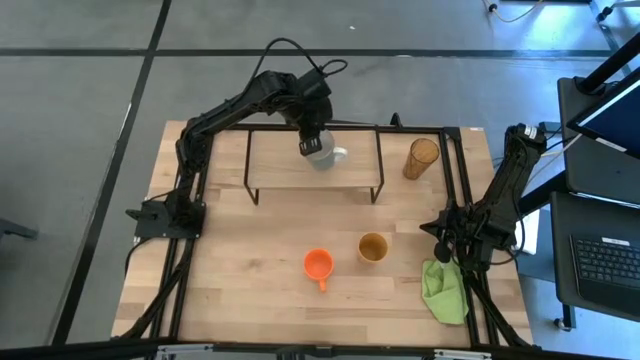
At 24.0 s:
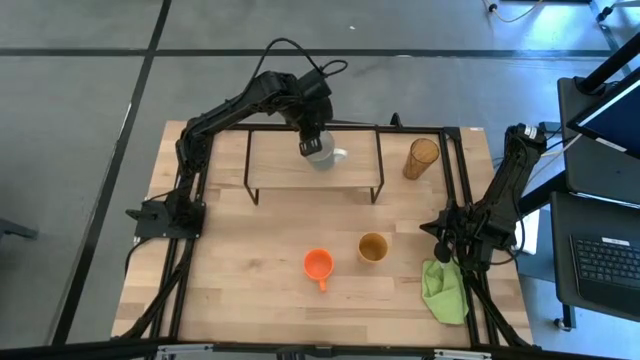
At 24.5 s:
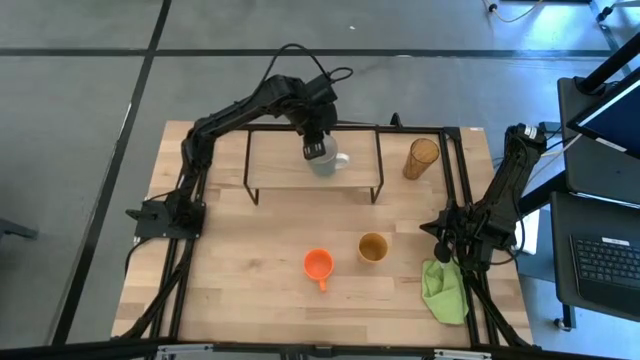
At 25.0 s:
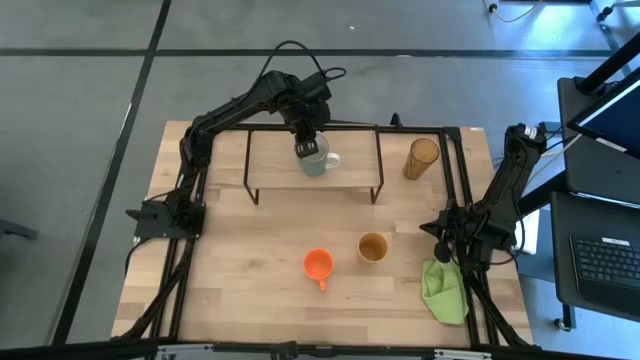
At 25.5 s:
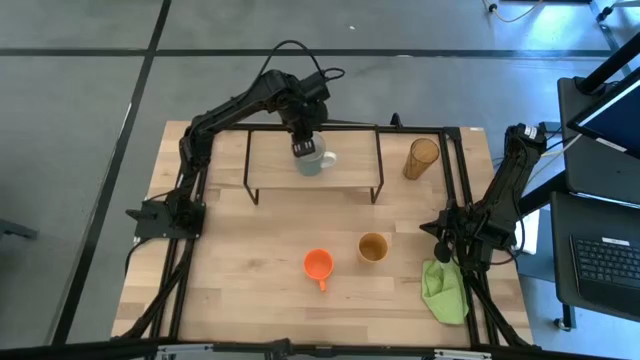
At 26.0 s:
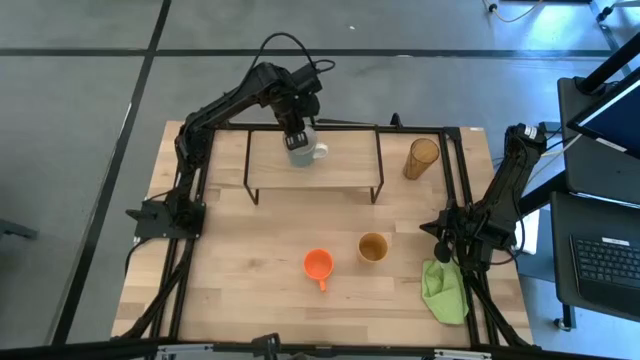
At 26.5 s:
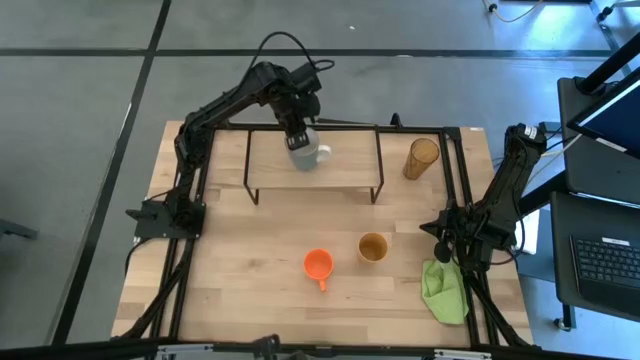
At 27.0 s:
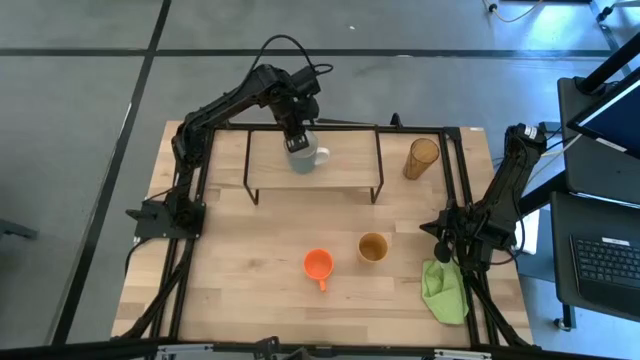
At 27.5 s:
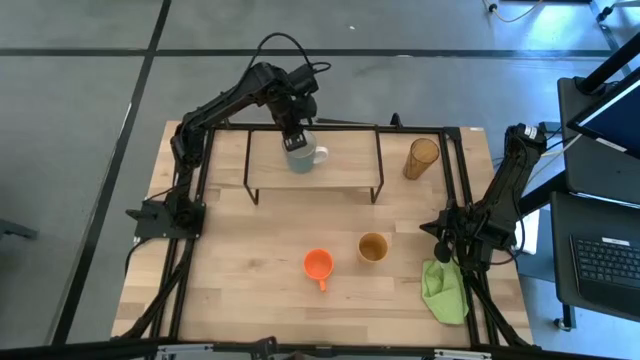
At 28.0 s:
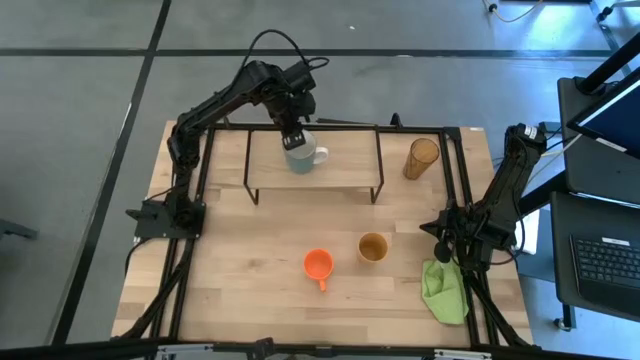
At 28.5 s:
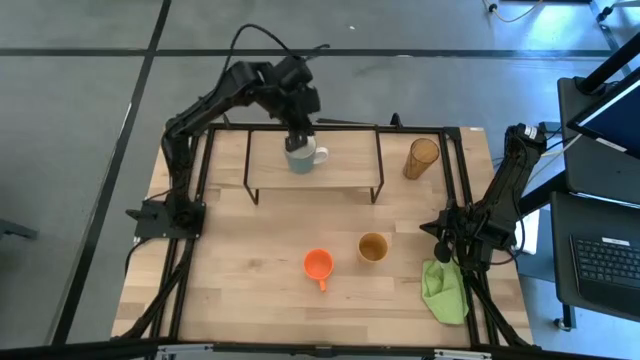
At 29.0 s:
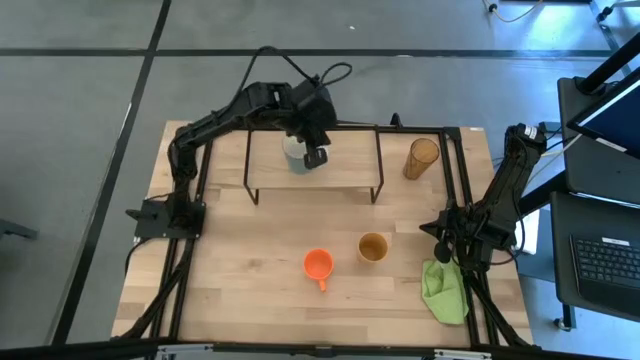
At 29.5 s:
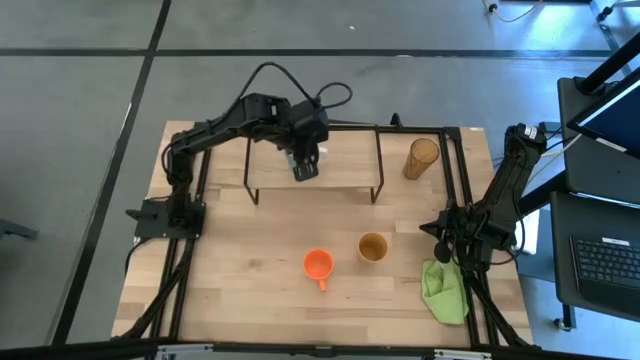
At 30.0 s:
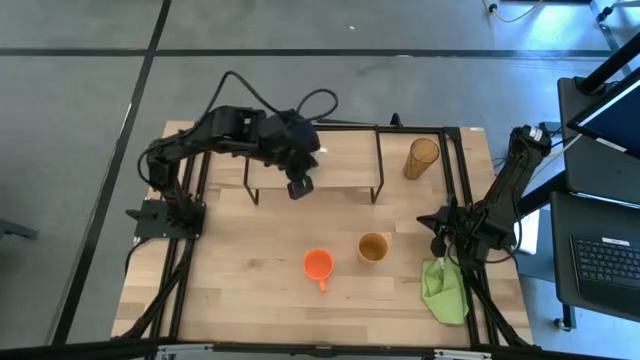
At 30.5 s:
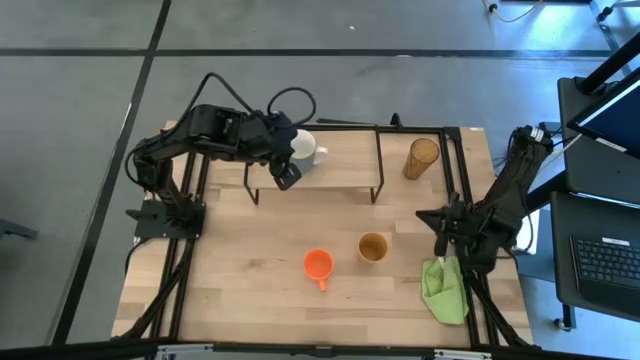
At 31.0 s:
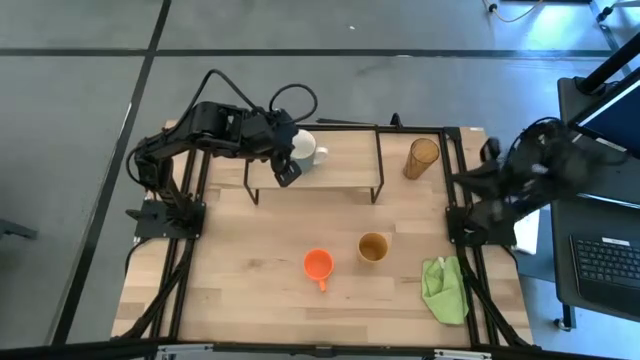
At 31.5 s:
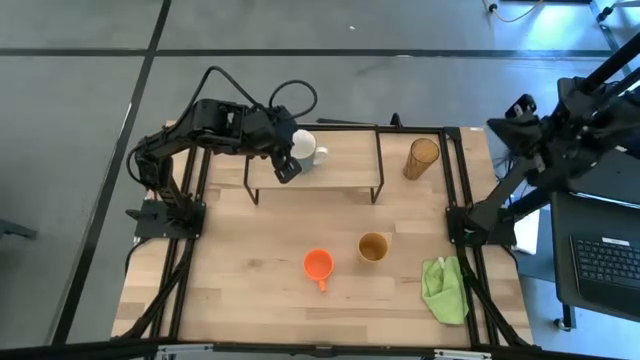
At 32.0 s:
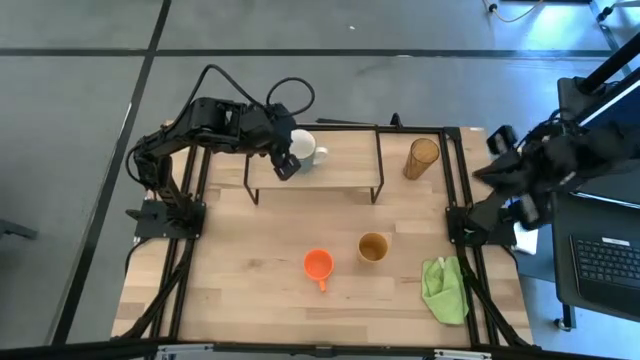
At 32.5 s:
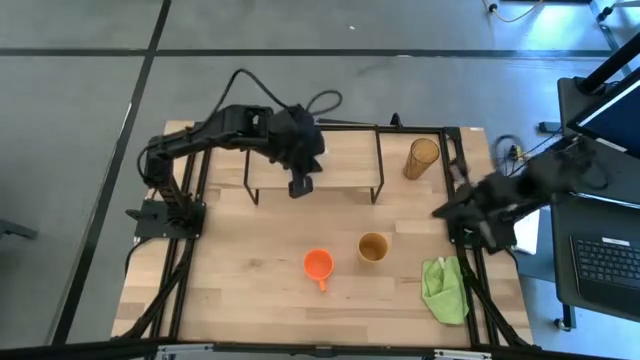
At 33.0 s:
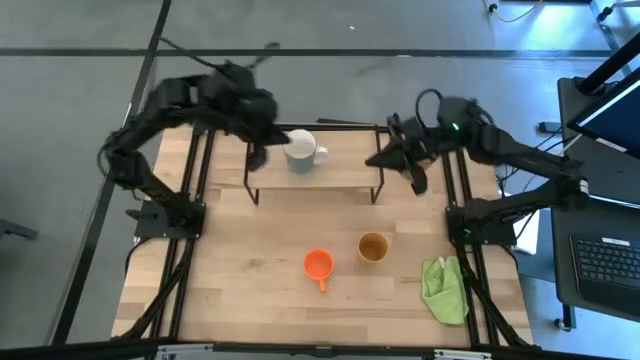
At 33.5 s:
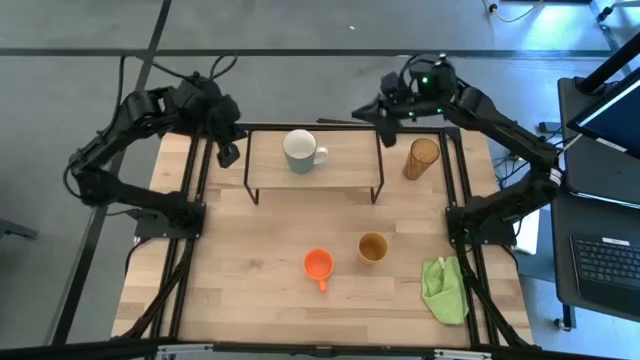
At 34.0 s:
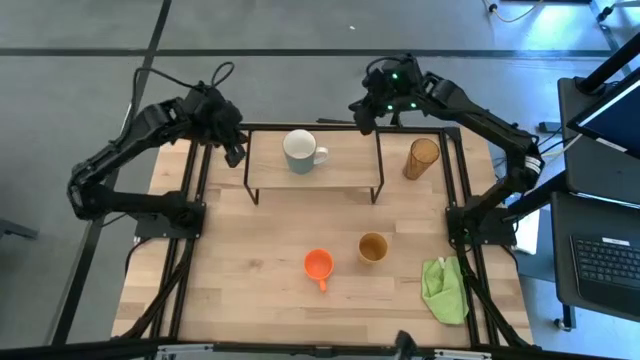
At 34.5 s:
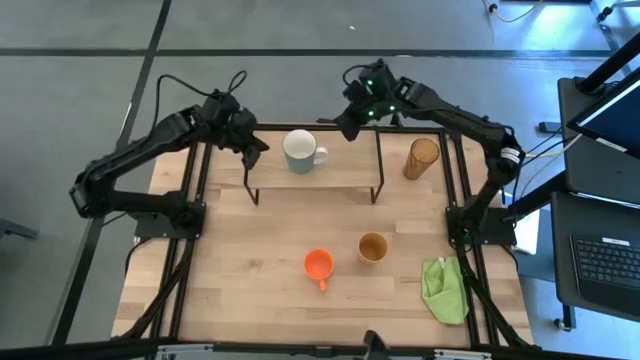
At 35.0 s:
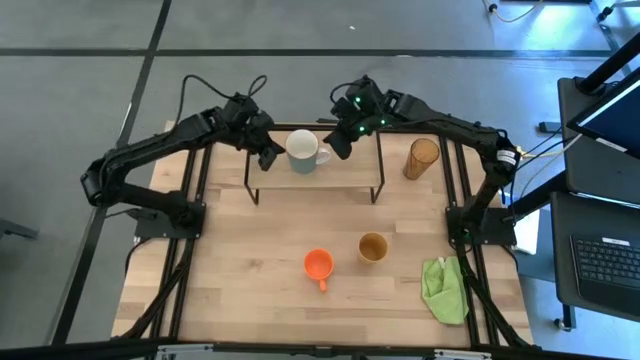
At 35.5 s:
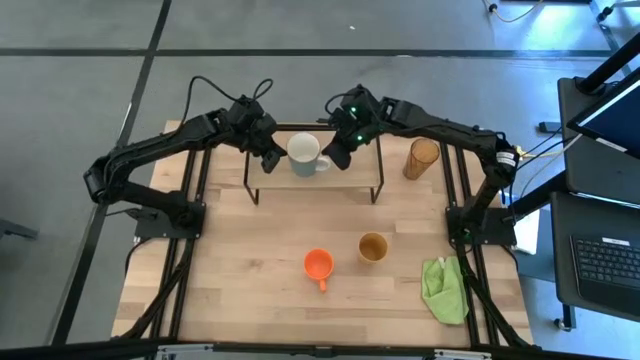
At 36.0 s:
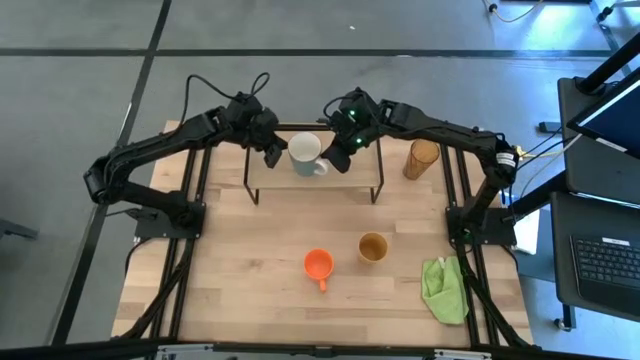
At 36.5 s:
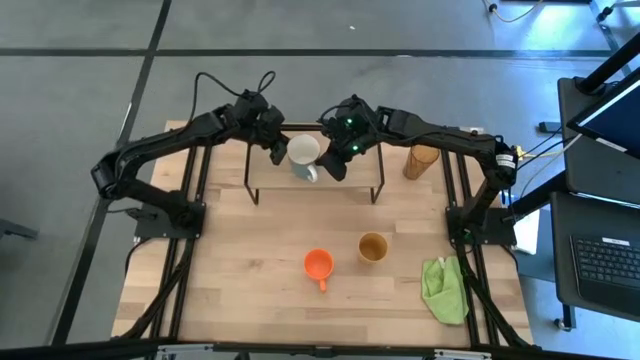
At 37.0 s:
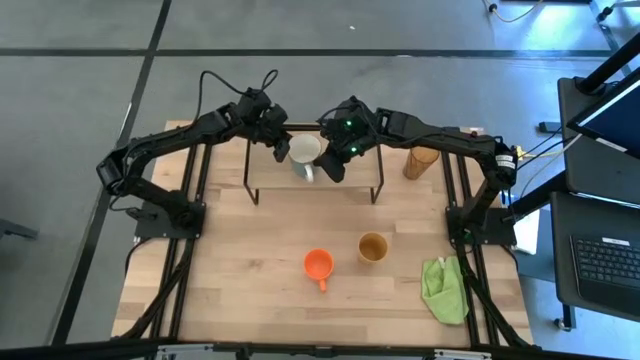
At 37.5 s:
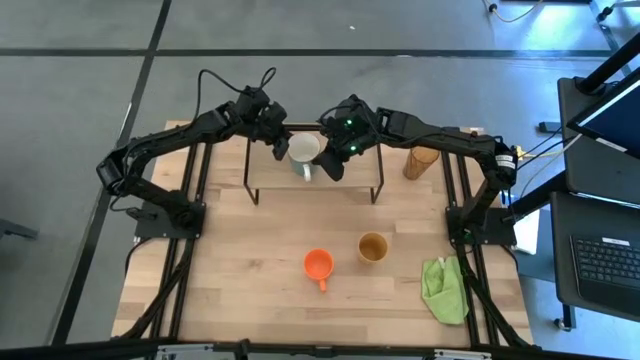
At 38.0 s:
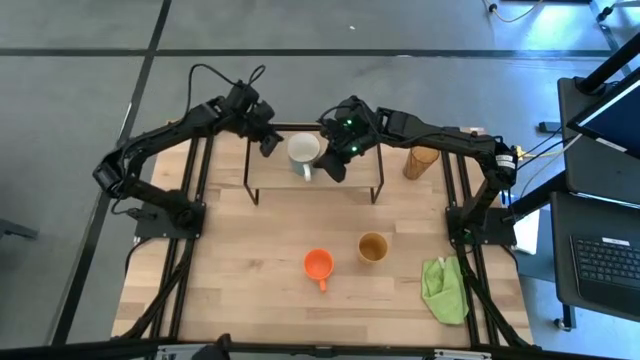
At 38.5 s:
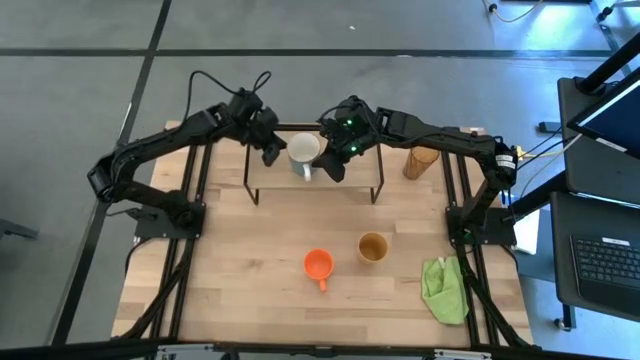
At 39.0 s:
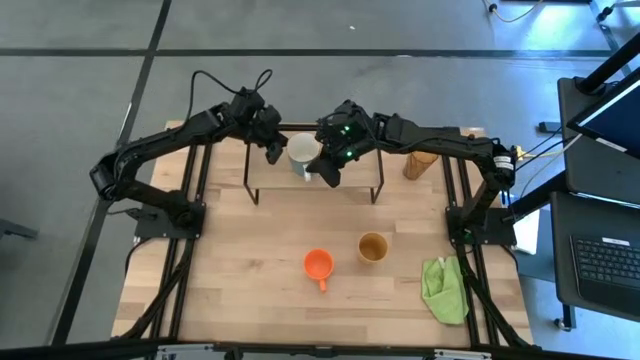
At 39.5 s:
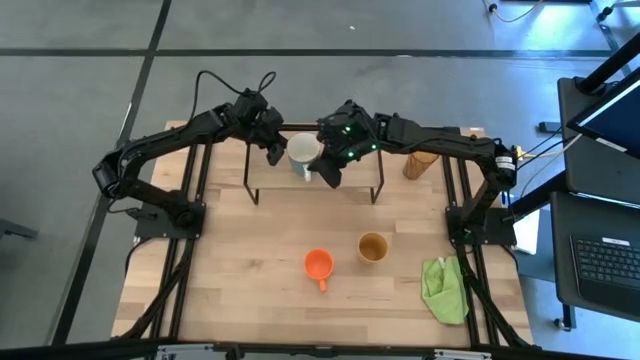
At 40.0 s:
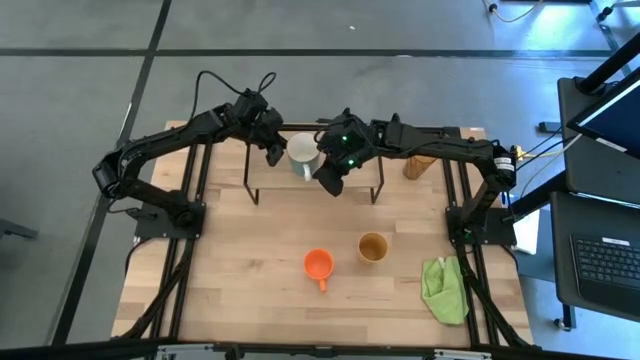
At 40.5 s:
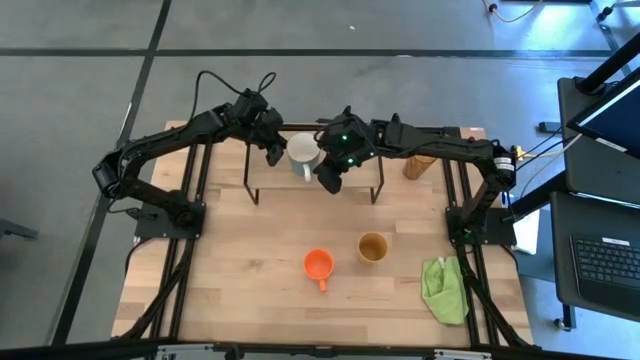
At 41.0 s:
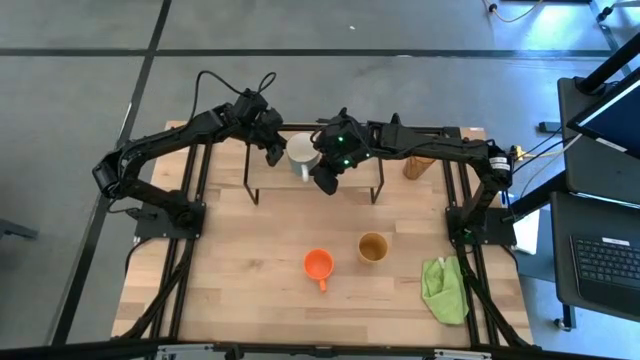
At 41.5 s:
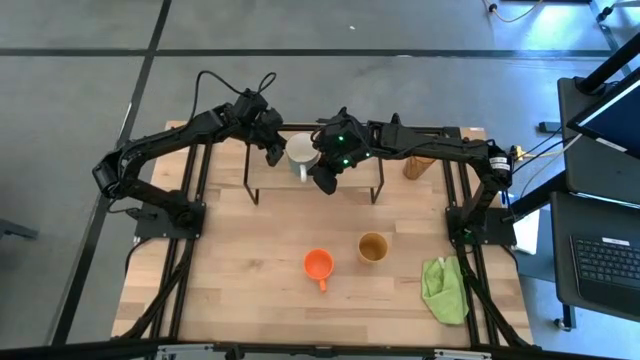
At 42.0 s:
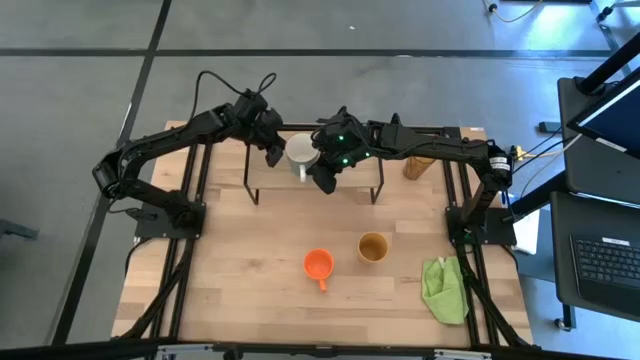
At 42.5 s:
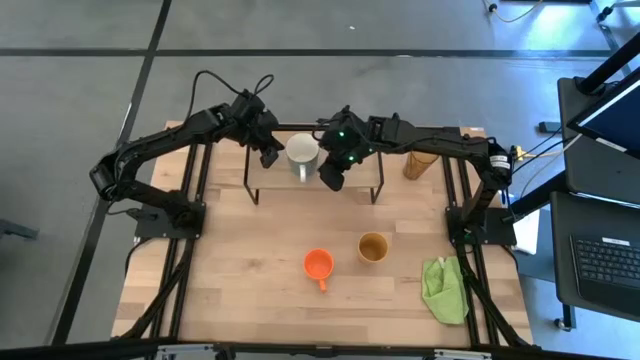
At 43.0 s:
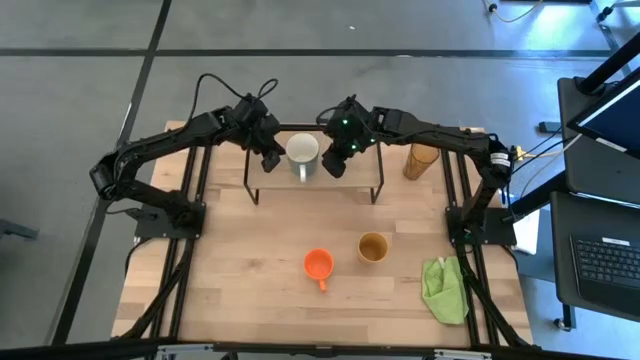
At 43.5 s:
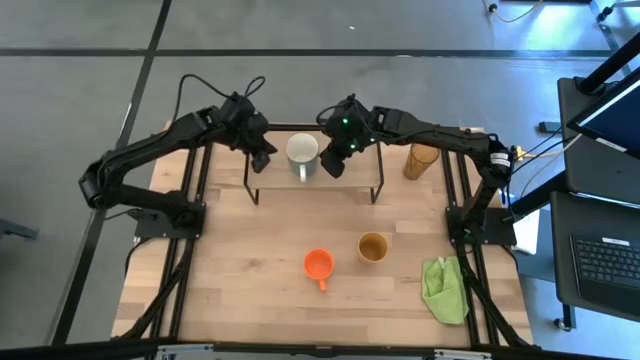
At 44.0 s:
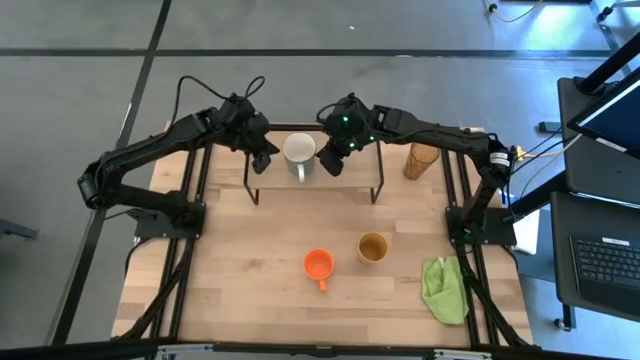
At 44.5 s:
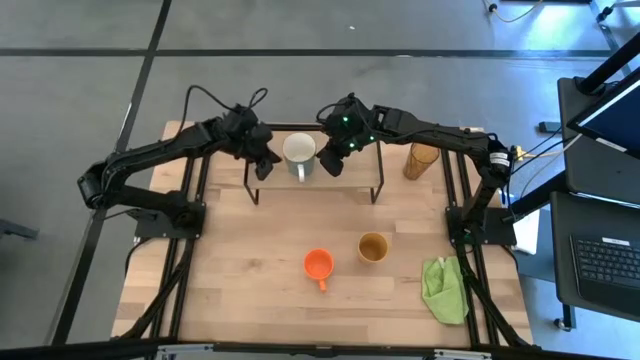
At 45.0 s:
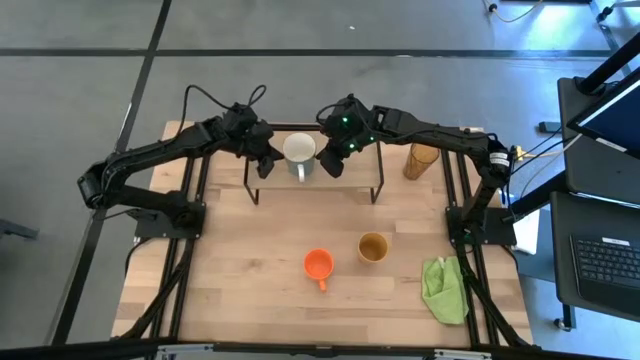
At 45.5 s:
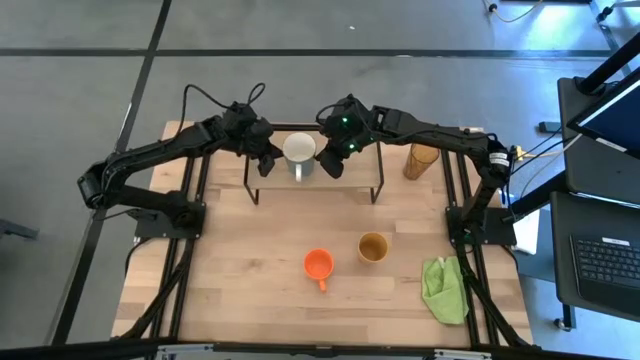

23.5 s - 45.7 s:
Task: Stack small to large cups/mugs on shelf
Put the blue mug on the shelf
